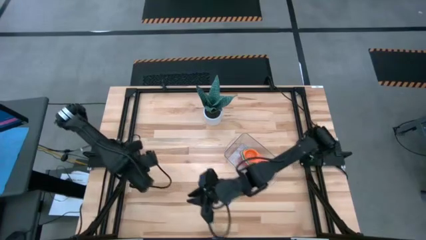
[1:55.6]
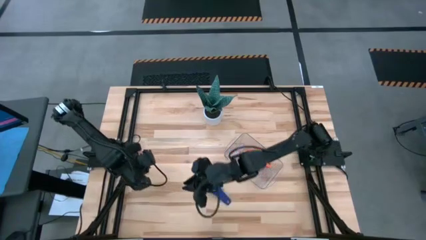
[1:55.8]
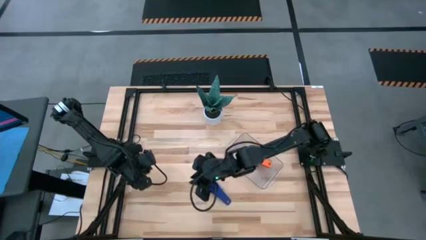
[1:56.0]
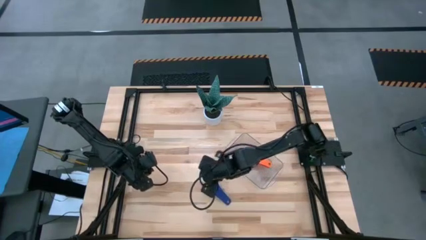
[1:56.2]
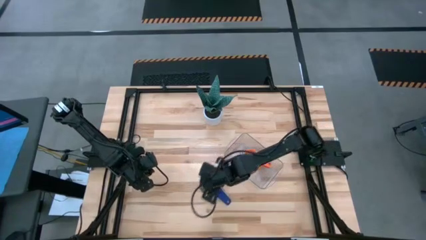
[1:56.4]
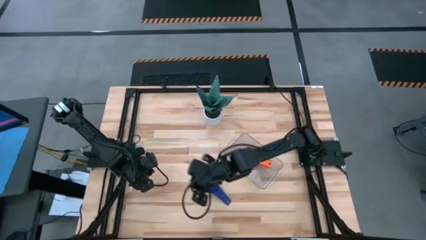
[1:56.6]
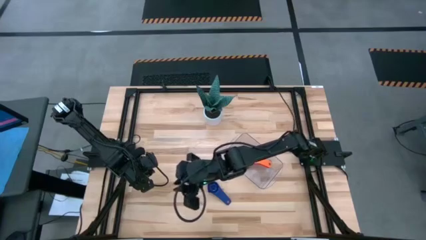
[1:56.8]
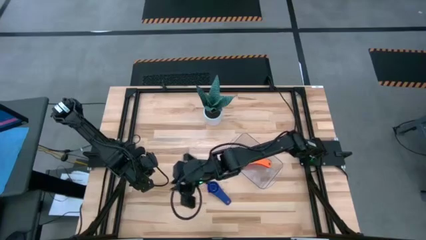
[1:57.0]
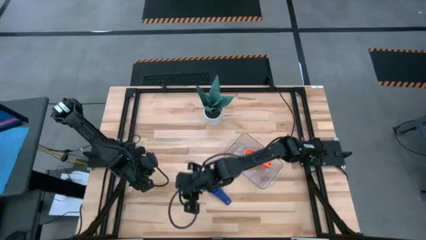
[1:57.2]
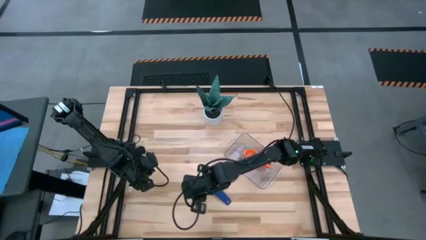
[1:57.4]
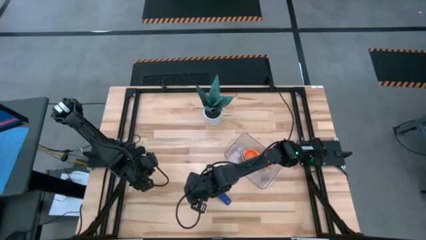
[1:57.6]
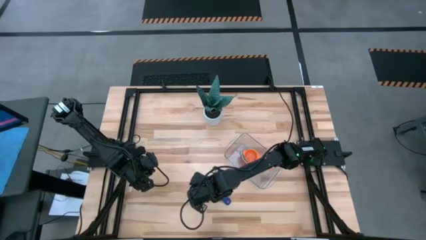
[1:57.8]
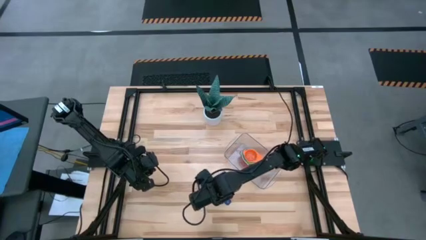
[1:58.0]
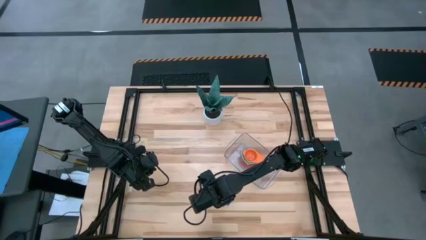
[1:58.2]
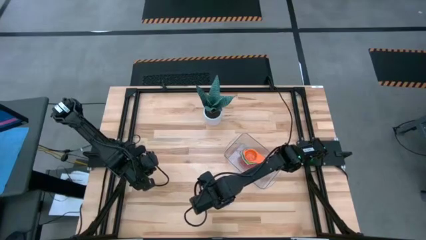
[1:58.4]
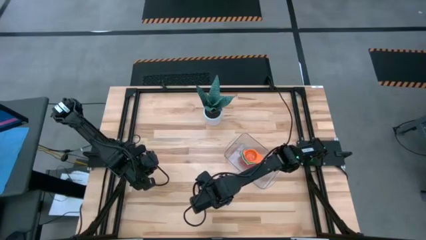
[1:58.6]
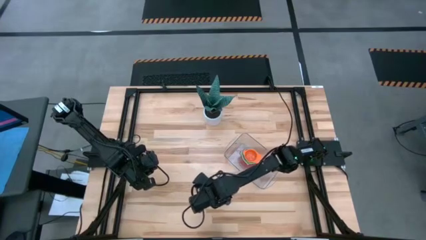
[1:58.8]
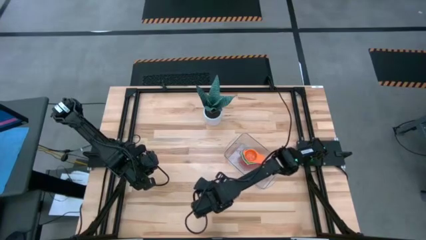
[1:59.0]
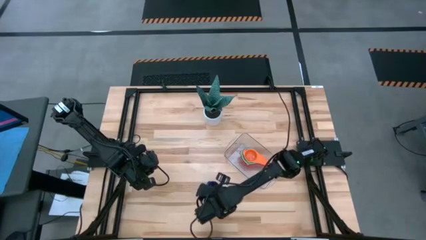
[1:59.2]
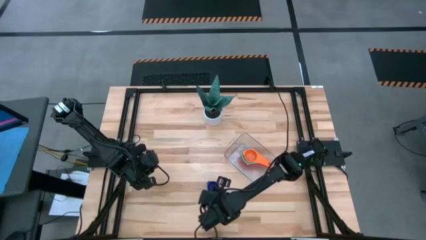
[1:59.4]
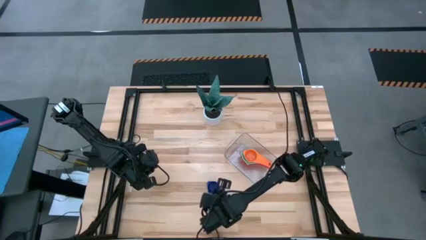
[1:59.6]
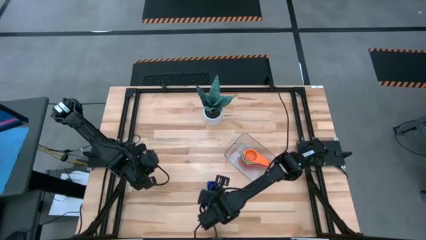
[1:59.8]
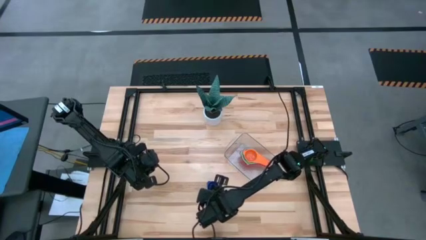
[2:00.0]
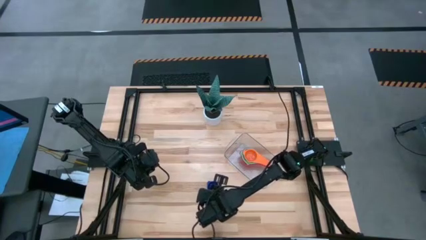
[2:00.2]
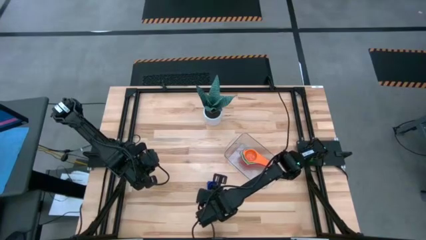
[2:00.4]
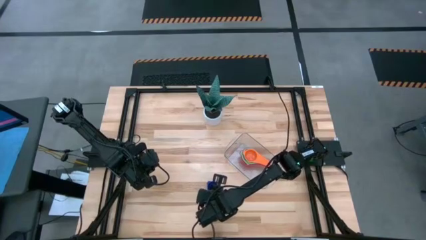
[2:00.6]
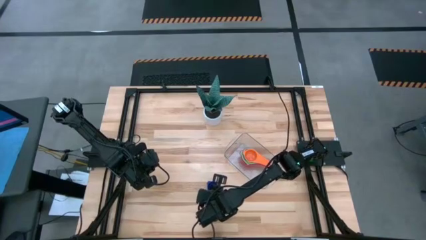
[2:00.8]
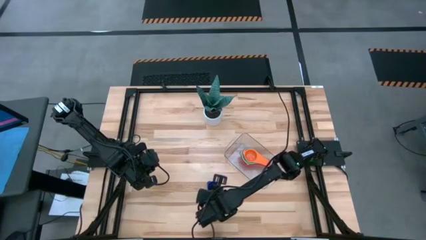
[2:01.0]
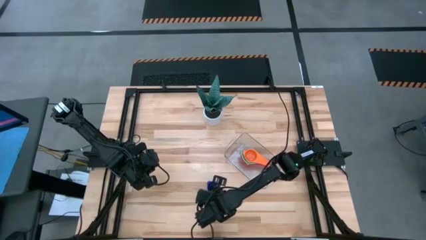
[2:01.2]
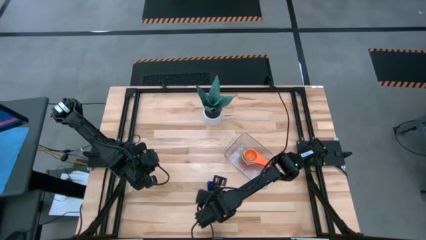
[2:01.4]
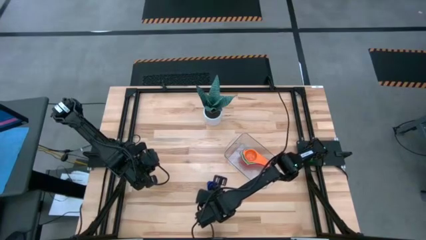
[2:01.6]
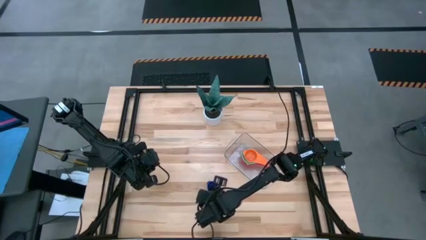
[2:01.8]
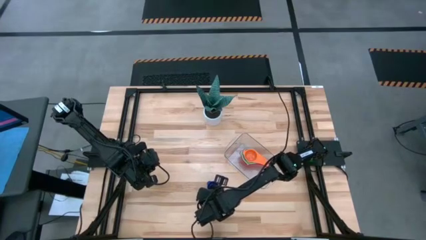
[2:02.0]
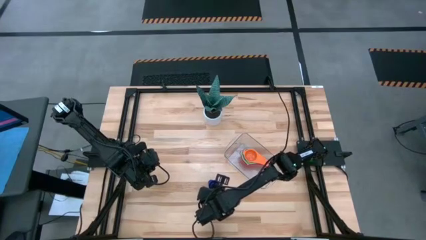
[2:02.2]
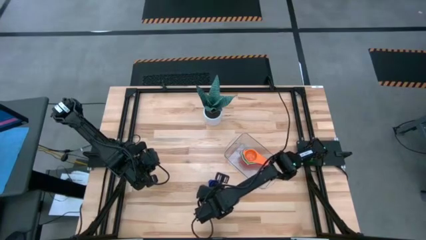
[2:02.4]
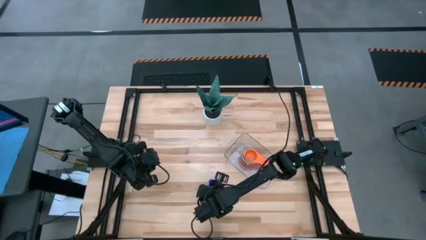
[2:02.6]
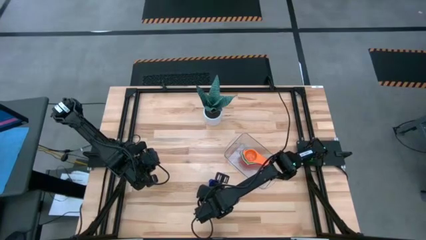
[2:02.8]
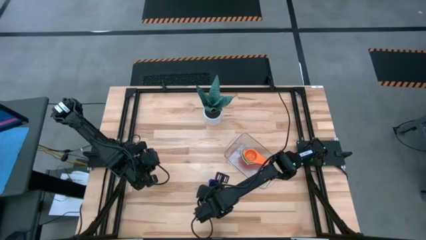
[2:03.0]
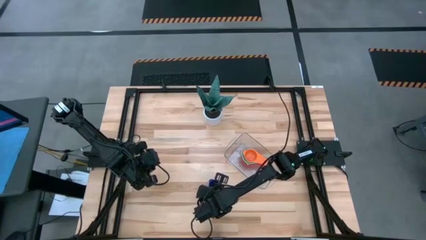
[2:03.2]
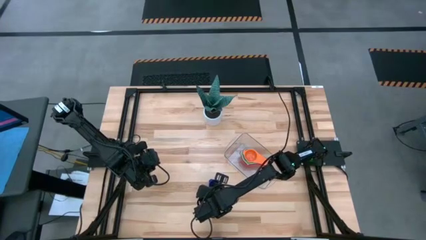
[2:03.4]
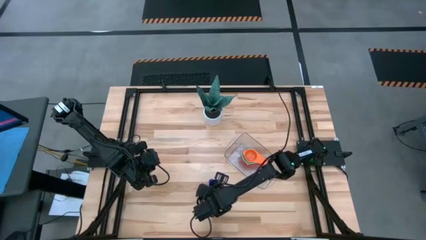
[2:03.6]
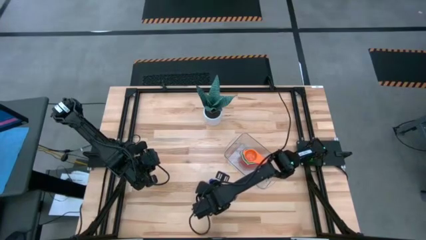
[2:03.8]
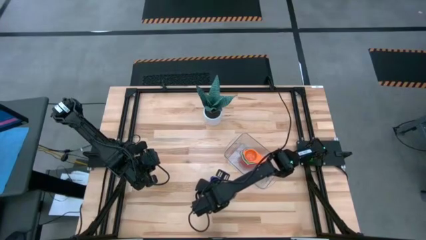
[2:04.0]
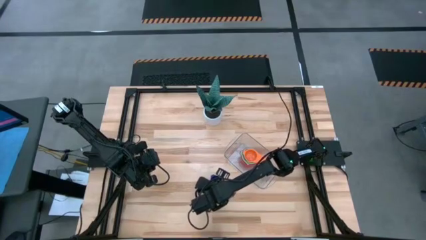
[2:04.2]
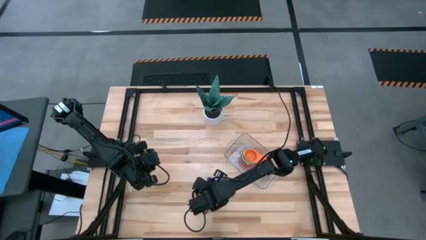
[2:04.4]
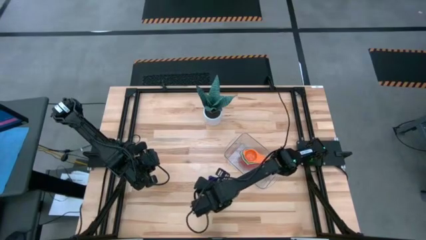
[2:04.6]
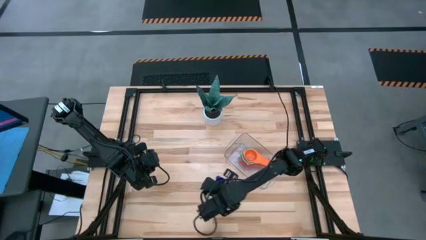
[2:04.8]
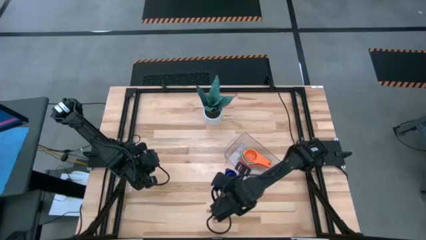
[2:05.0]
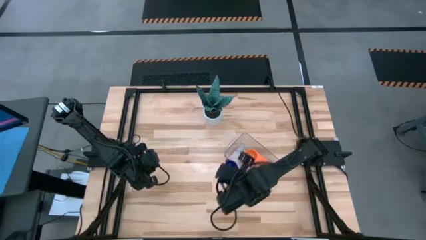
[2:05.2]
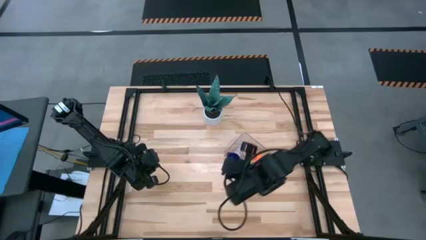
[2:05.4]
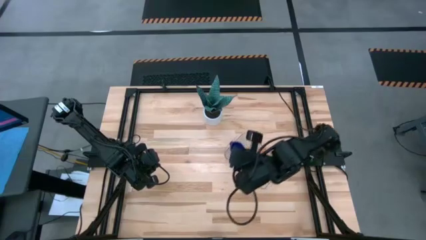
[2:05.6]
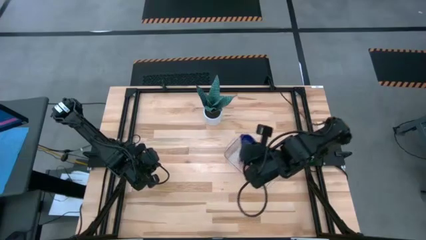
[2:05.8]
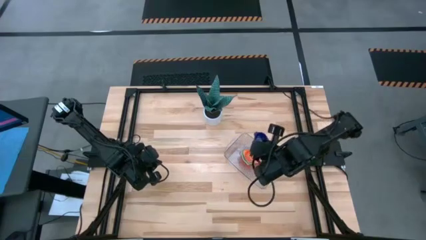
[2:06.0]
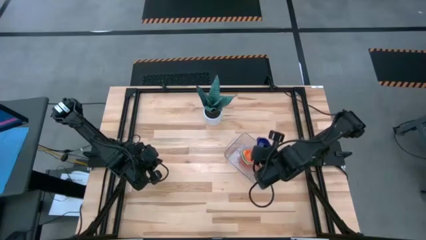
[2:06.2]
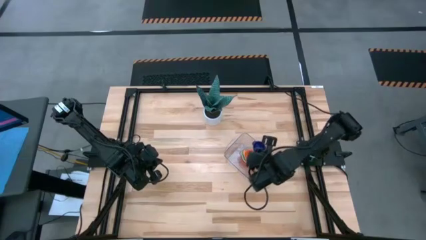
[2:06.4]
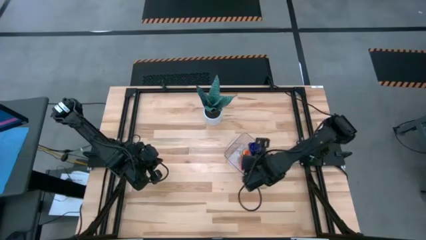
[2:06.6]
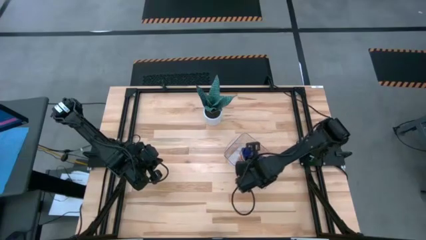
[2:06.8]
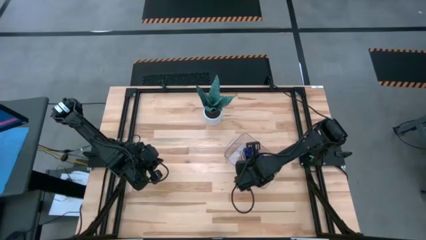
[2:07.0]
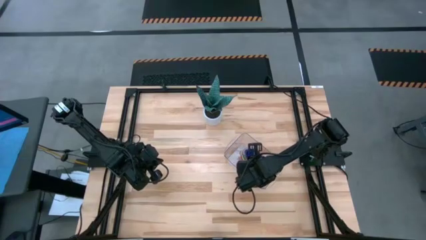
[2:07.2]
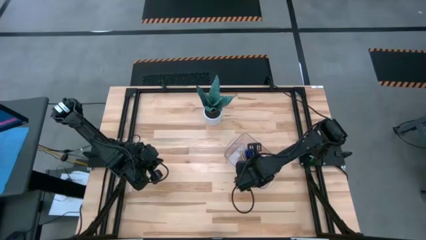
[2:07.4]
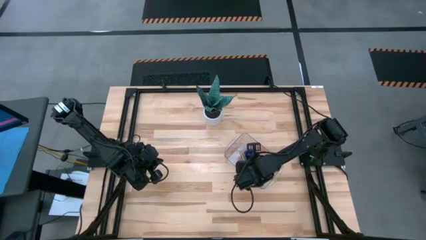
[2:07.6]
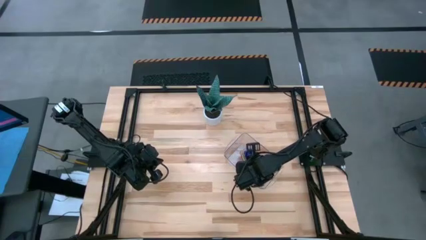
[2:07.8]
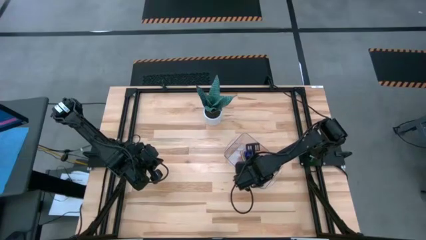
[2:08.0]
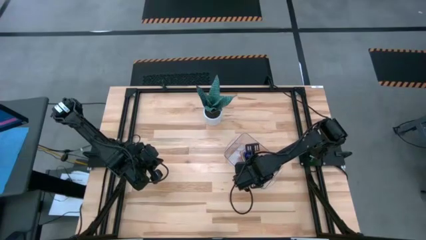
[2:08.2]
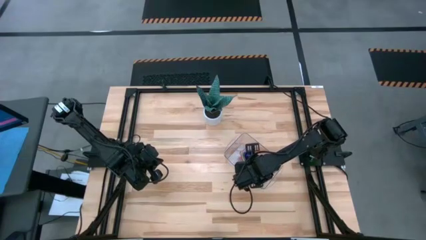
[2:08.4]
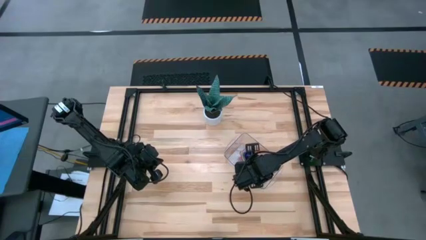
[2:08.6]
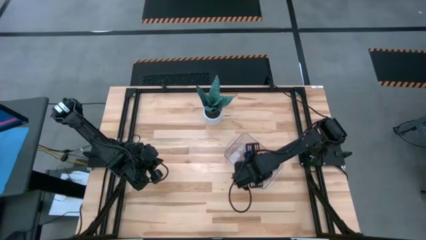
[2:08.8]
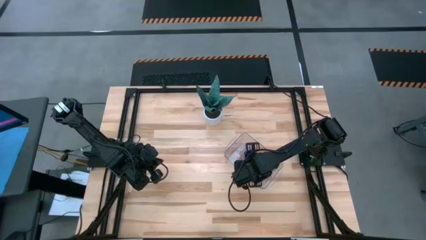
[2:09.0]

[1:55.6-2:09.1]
Task: Nest measuring cups in basket
Stack the violet measuring cup on top of the orange measuring cup
